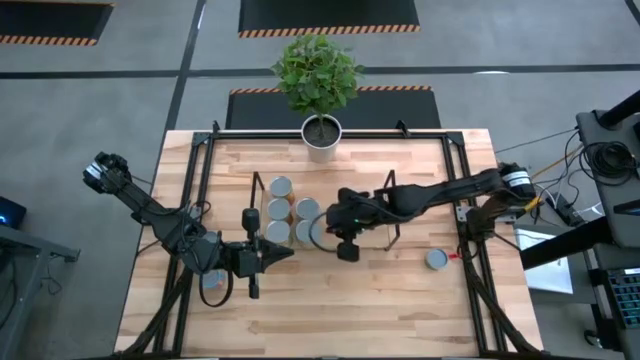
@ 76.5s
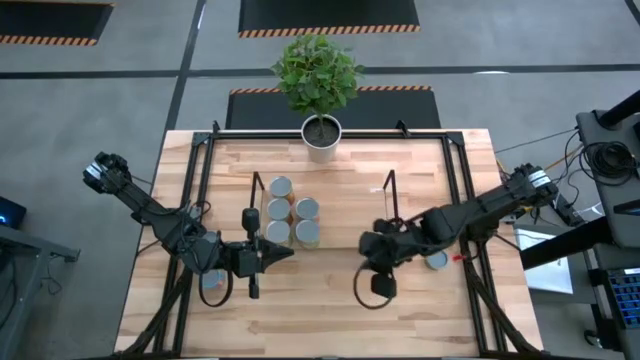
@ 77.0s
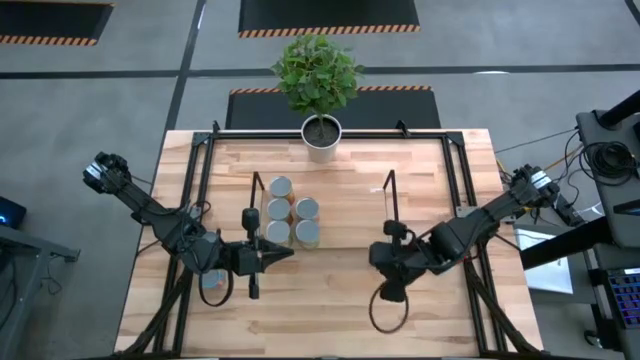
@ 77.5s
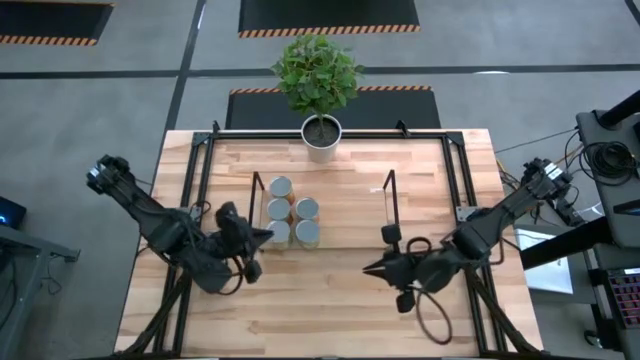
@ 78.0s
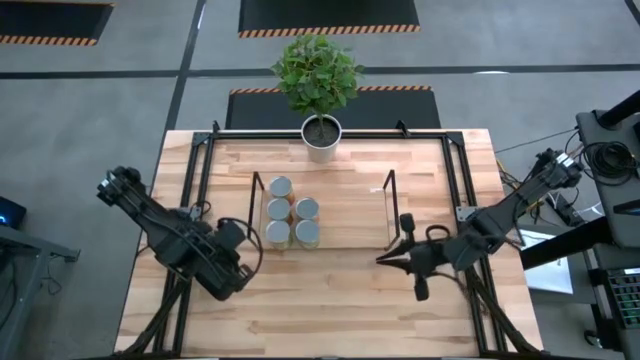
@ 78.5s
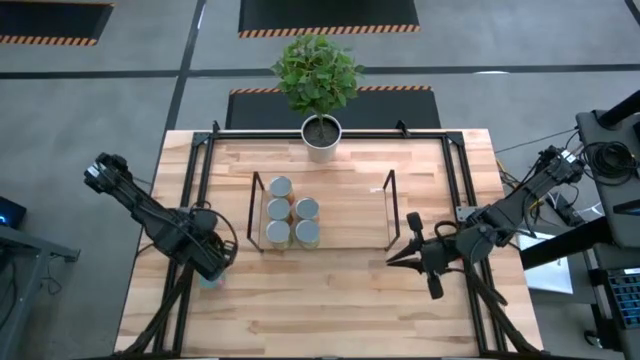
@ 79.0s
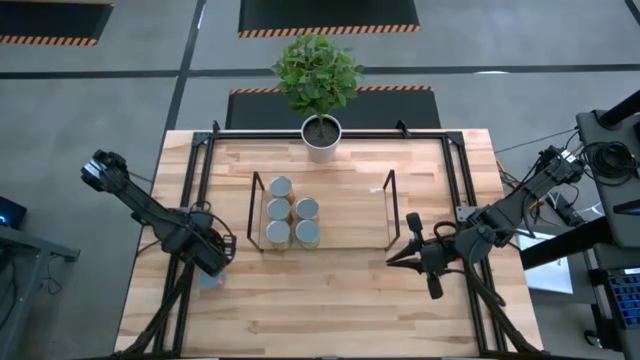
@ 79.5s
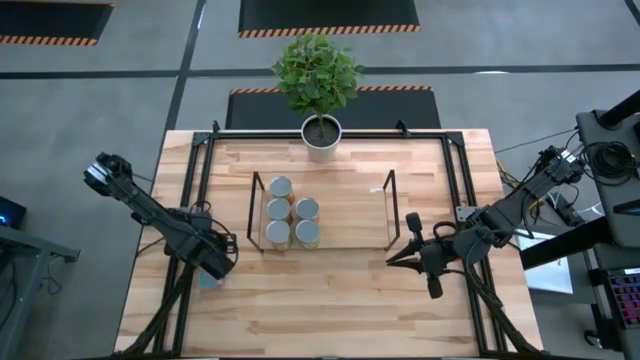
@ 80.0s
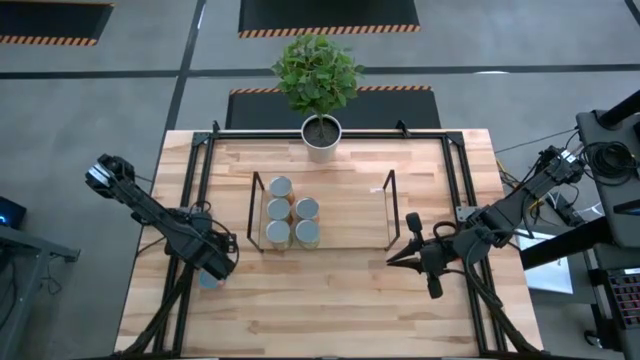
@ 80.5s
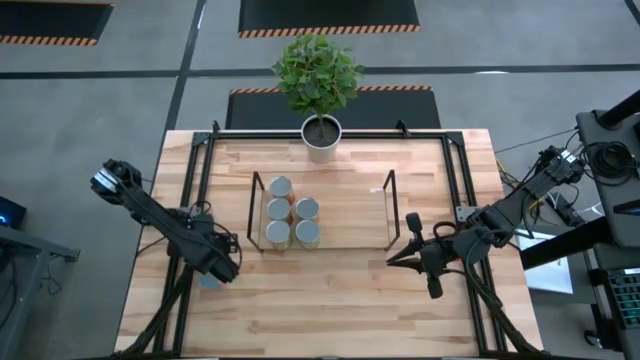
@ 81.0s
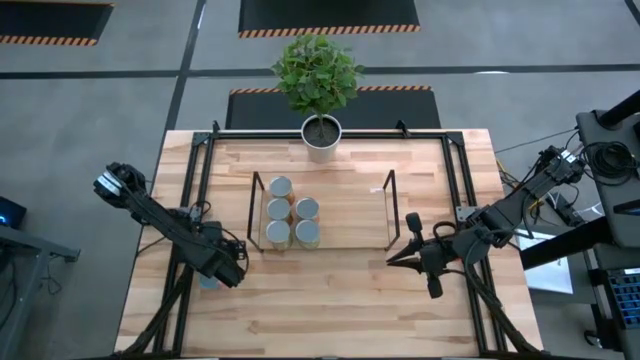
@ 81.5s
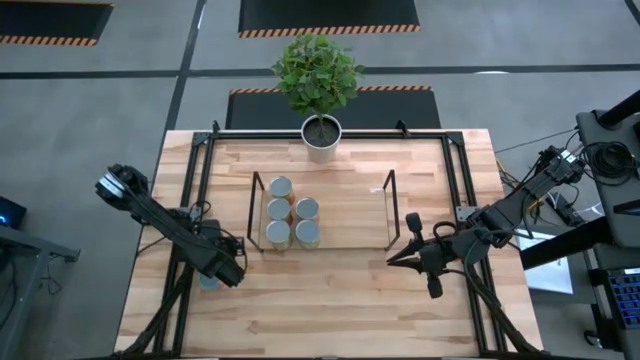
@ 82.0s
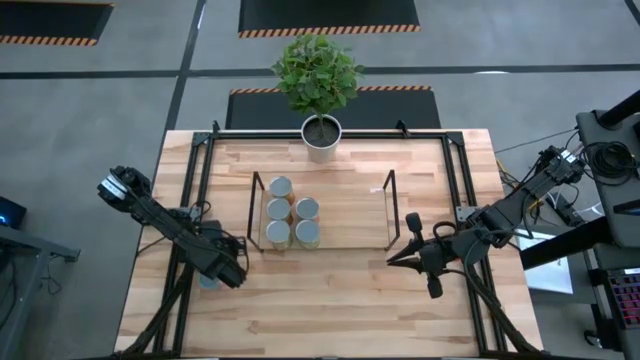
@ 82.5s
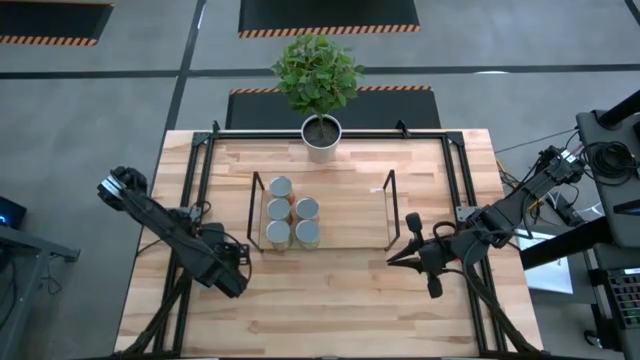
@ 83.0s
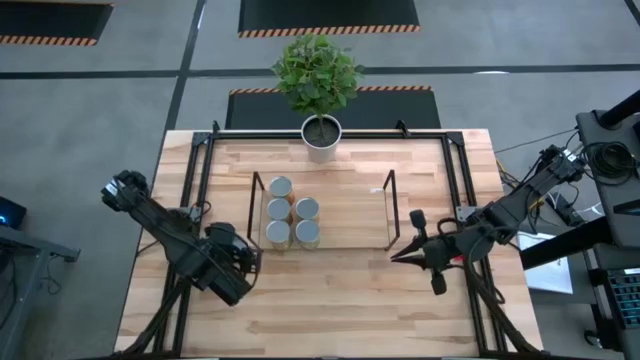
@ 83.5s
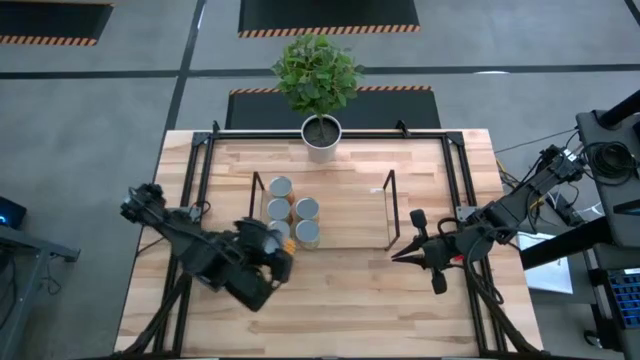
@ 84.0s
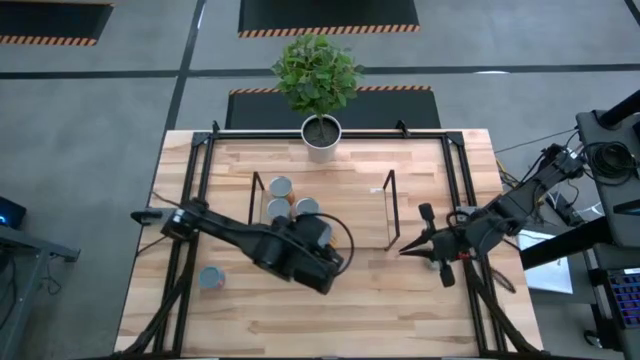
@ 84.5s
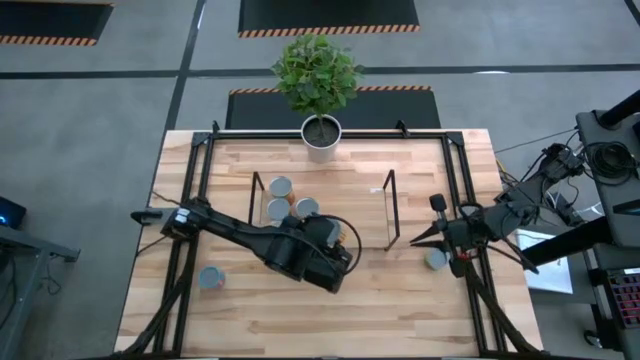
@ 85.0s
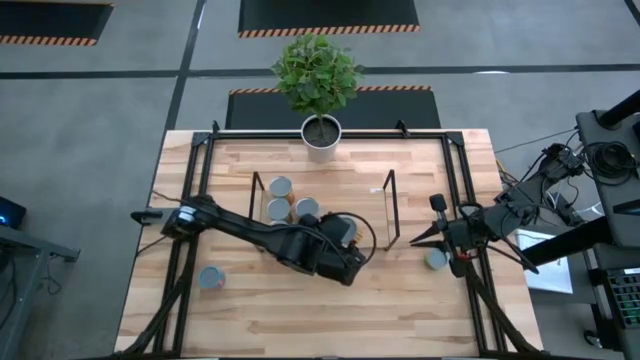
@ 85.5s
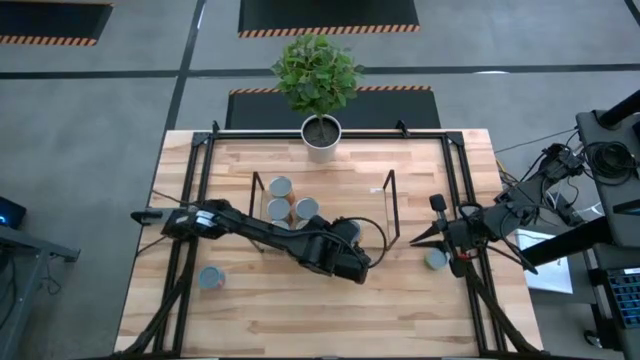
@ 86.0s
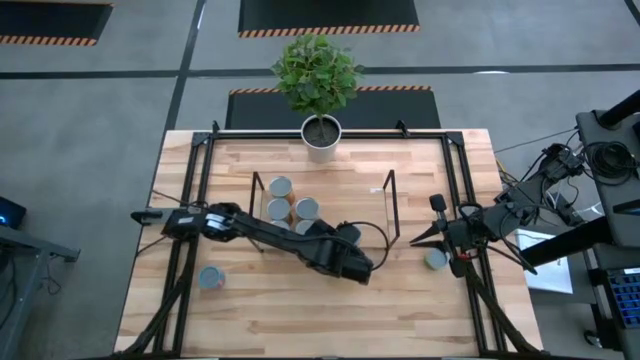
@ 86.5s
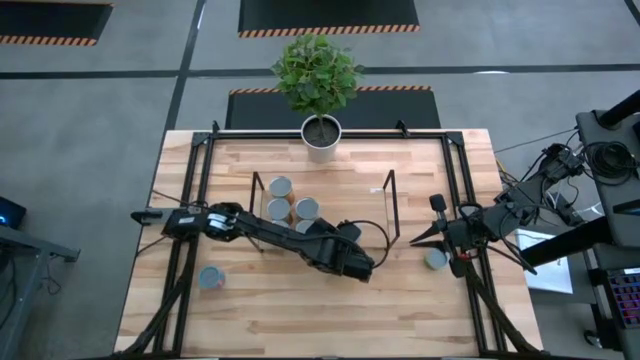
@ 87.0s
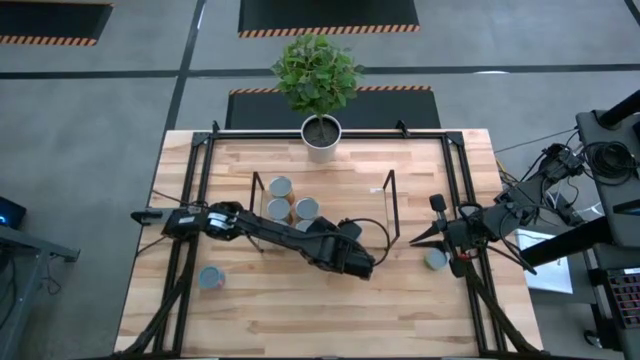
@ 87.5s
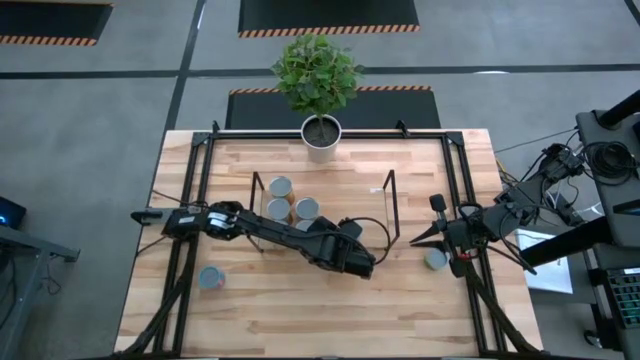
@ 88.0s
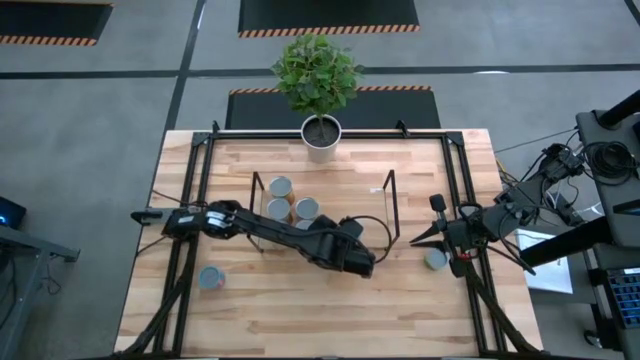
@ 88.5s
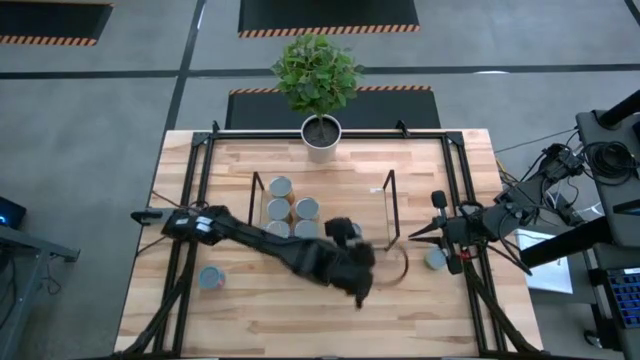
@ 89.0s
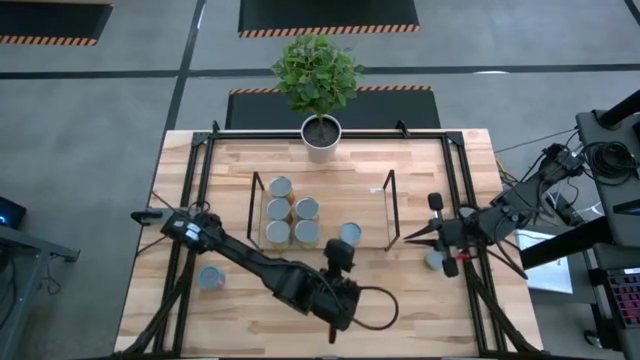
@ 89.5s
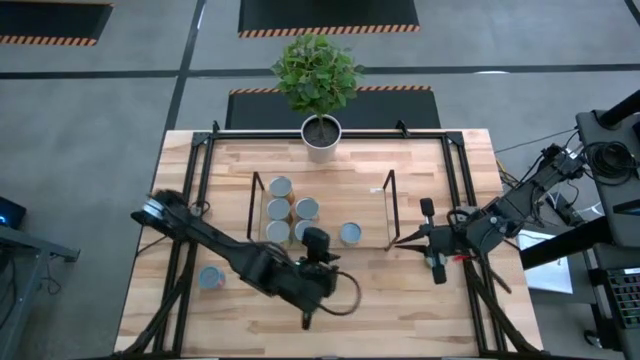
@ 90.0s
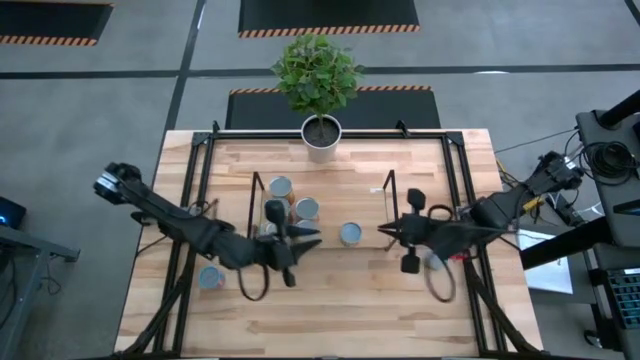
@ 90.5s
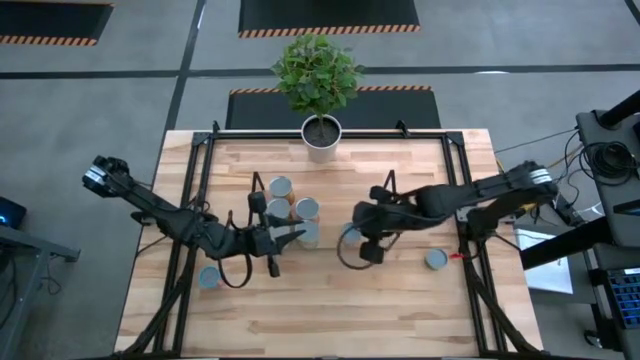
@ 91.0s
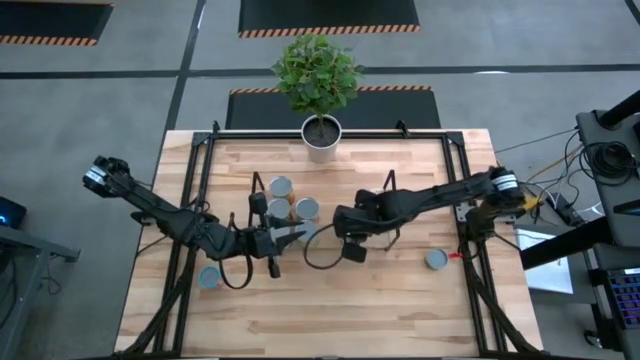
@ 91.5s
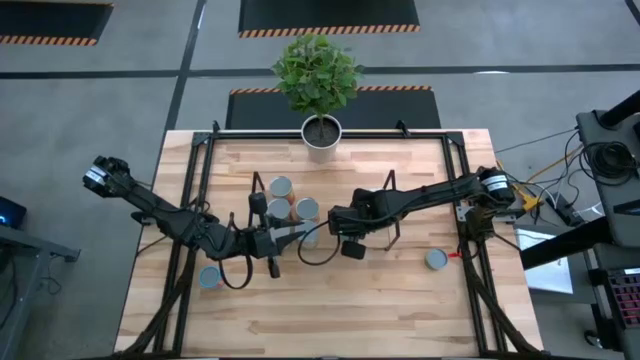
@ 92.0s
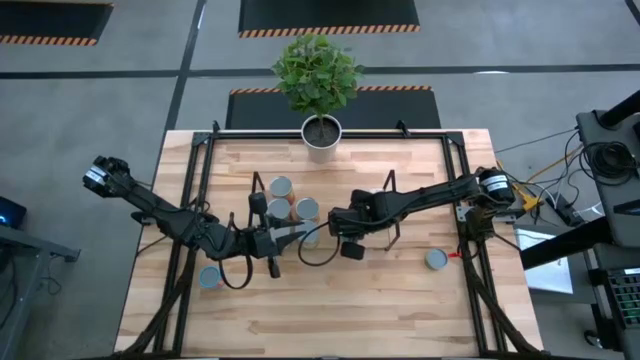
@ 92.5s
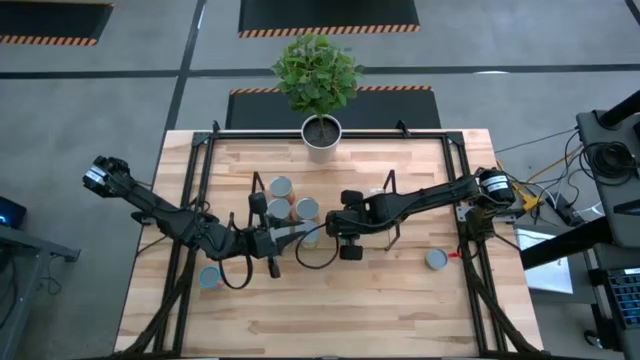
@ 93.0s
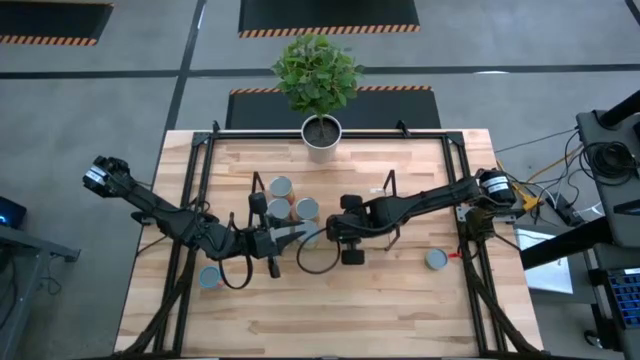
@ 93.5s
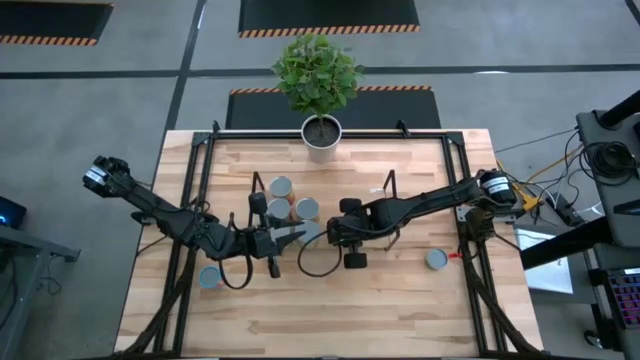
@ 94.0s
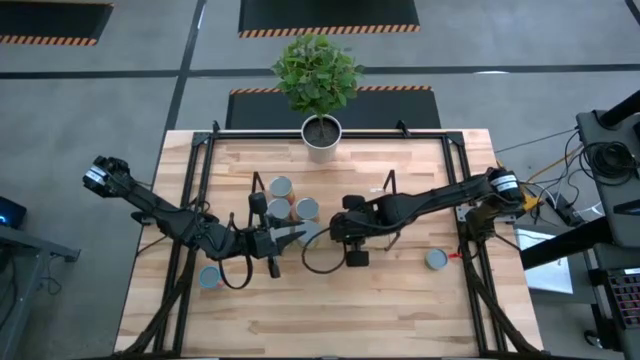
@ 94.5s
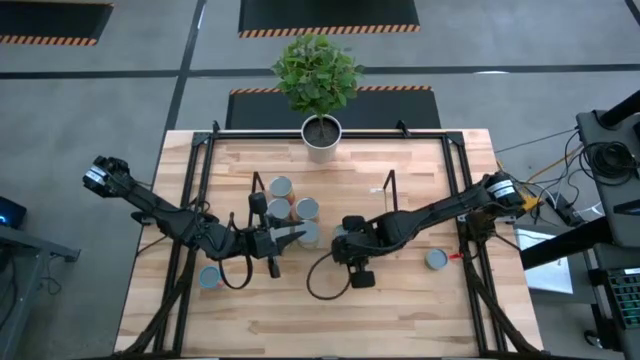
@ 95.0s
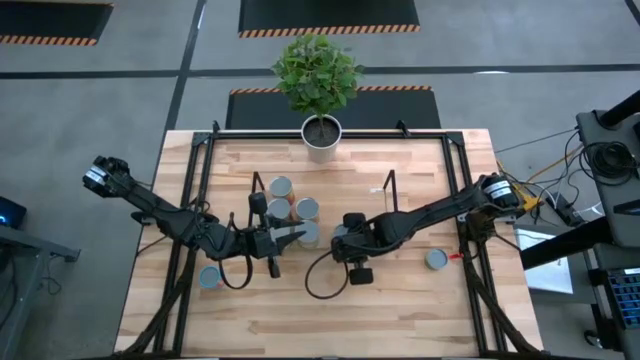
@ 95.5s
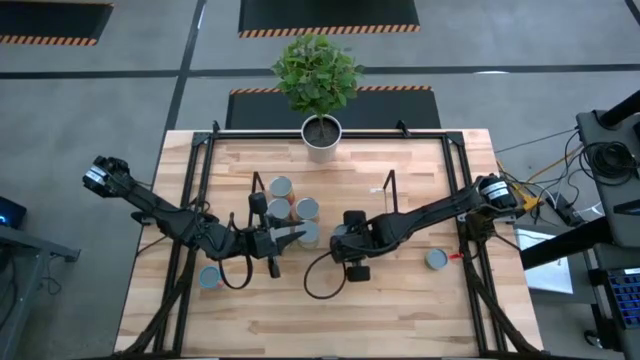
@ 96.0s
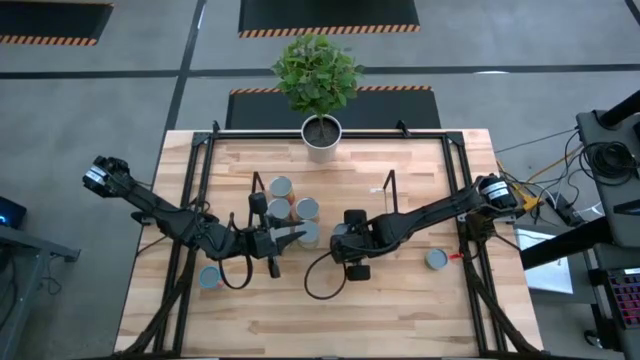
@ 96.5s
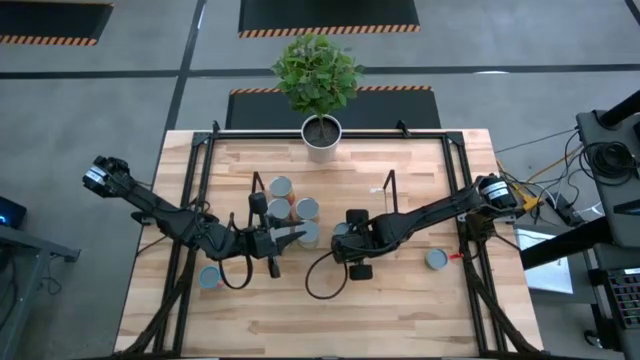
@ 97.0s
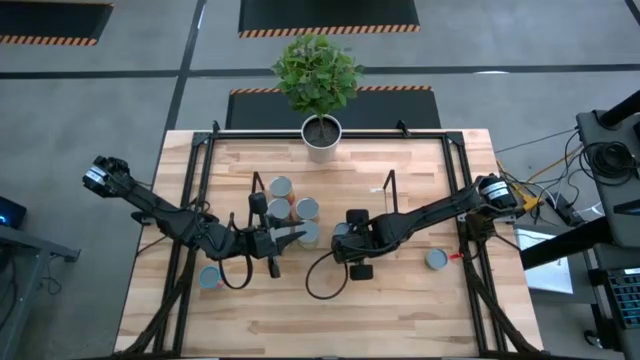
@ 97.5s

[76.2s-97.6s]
Task: Pick and place cans onto a shelf
Put the canned spicy black beans on the shelf
